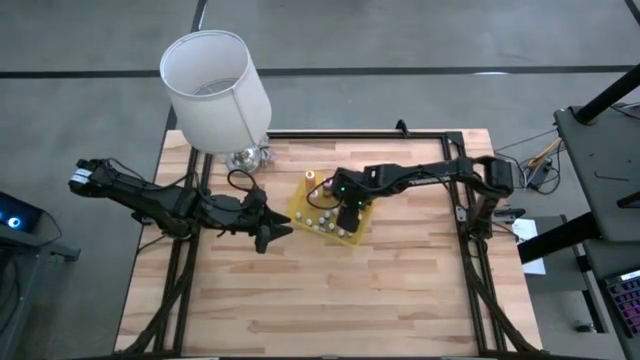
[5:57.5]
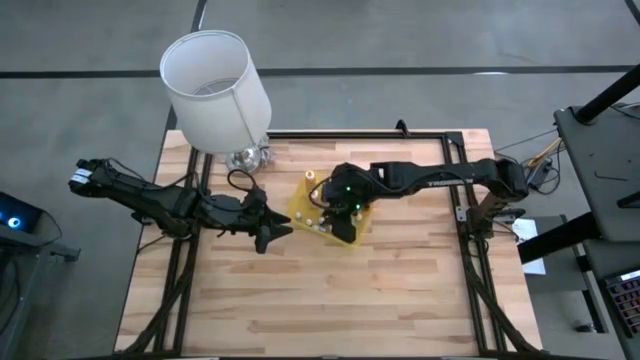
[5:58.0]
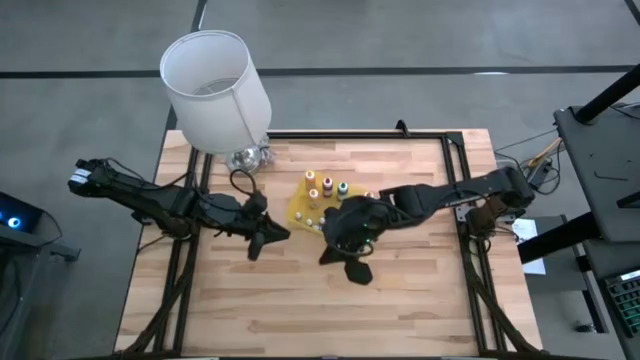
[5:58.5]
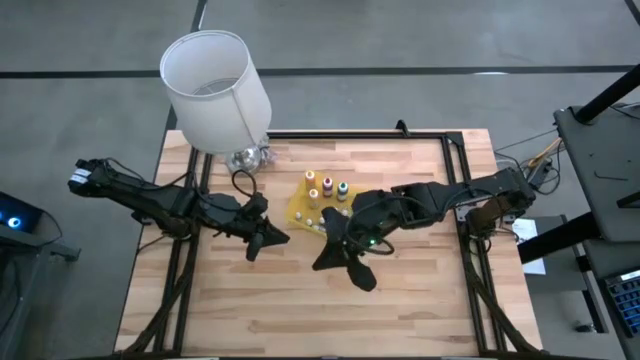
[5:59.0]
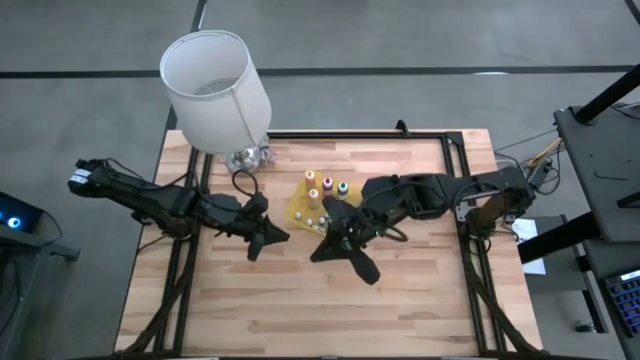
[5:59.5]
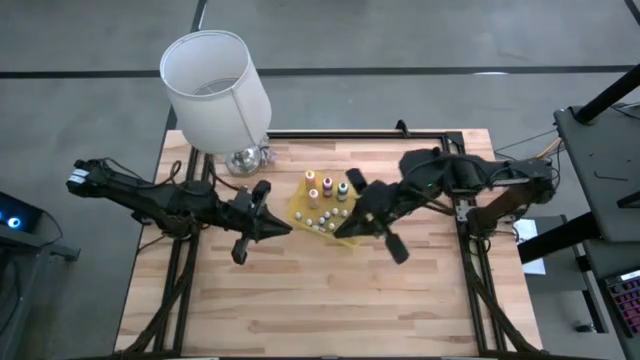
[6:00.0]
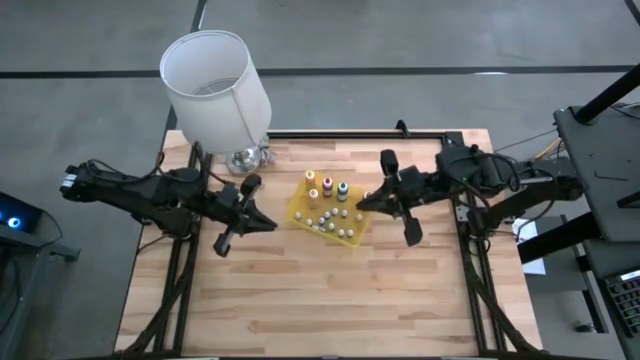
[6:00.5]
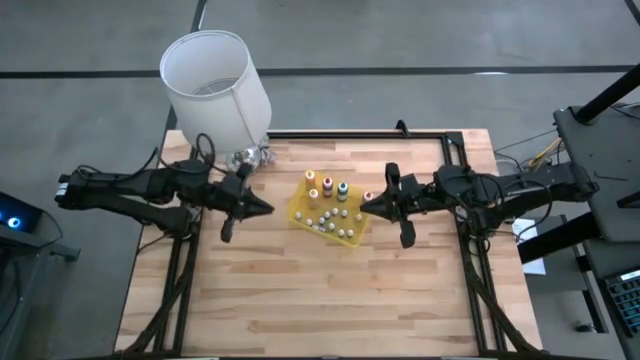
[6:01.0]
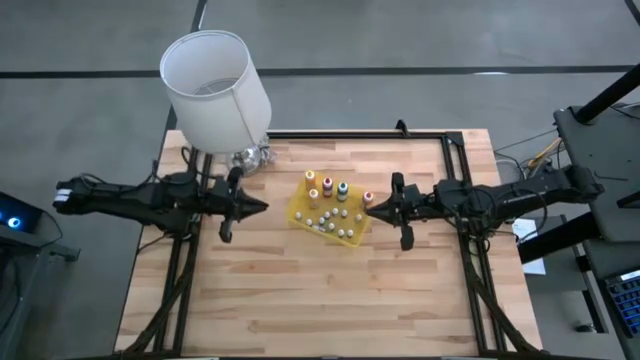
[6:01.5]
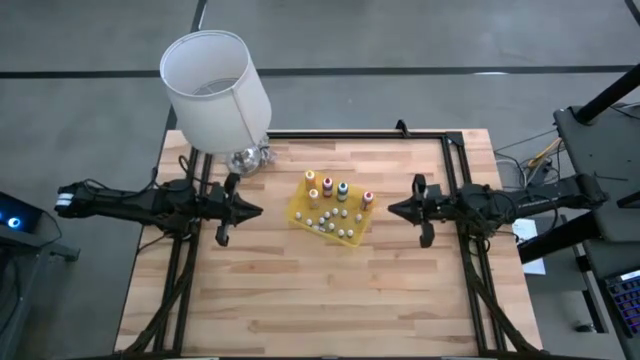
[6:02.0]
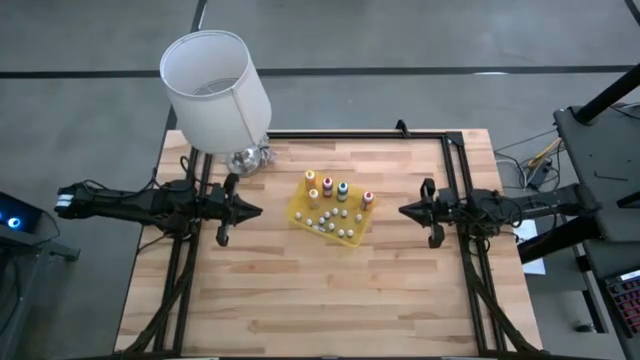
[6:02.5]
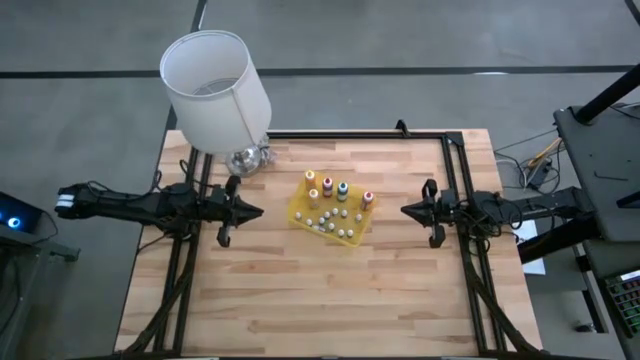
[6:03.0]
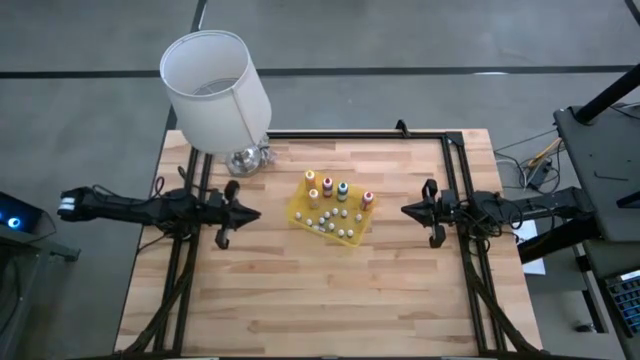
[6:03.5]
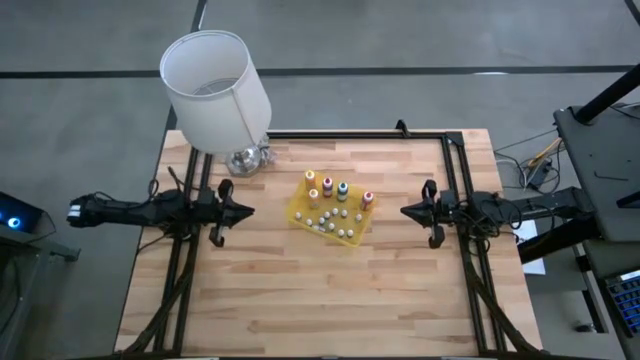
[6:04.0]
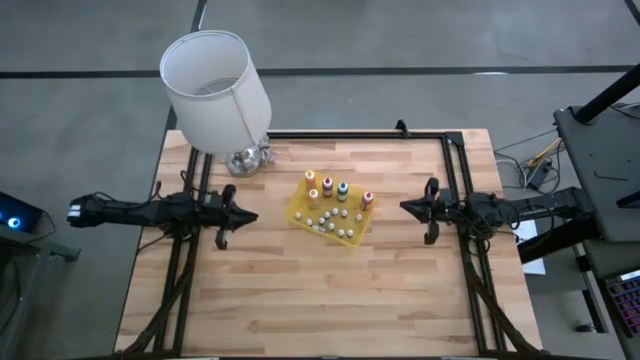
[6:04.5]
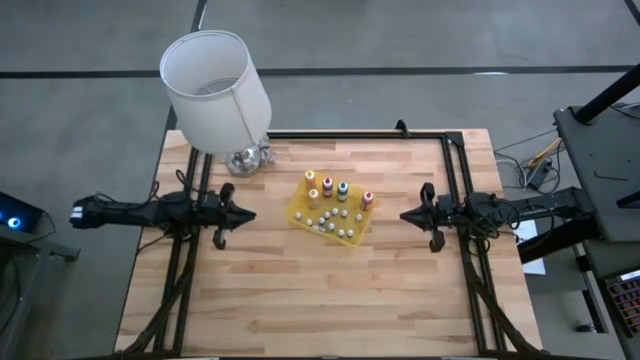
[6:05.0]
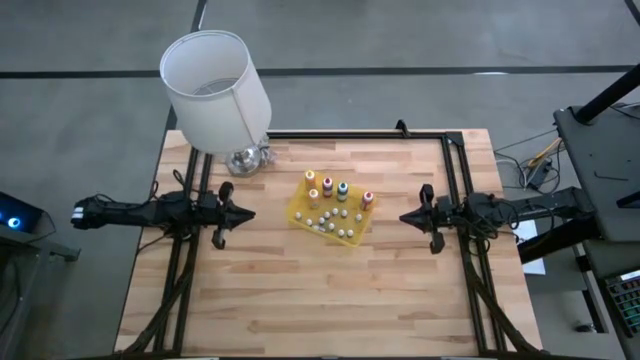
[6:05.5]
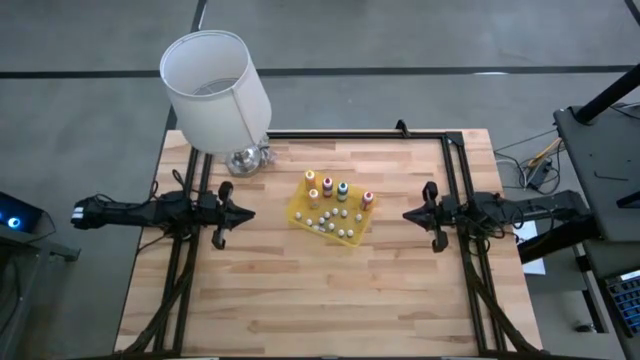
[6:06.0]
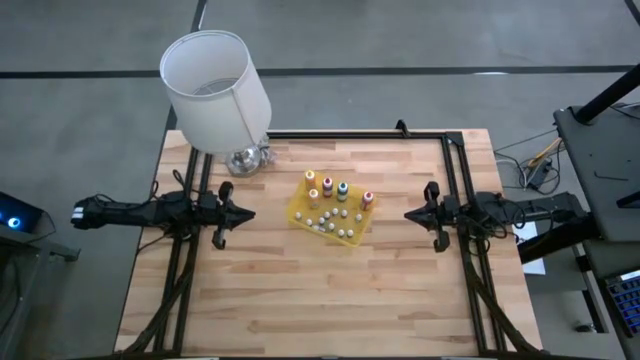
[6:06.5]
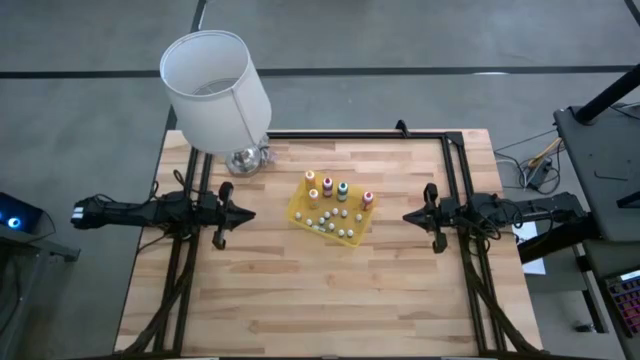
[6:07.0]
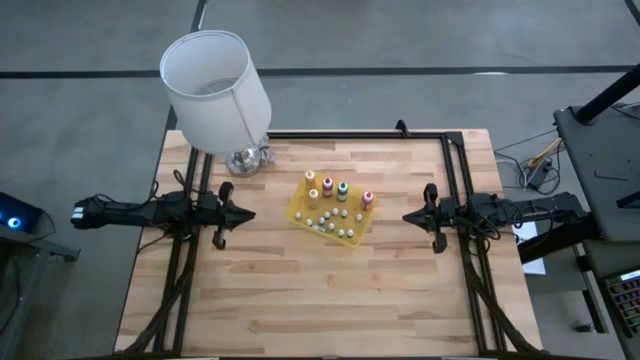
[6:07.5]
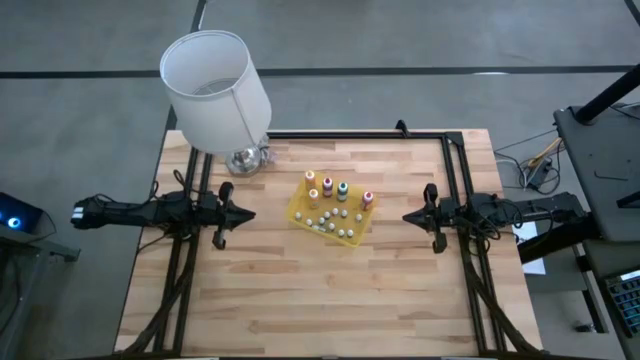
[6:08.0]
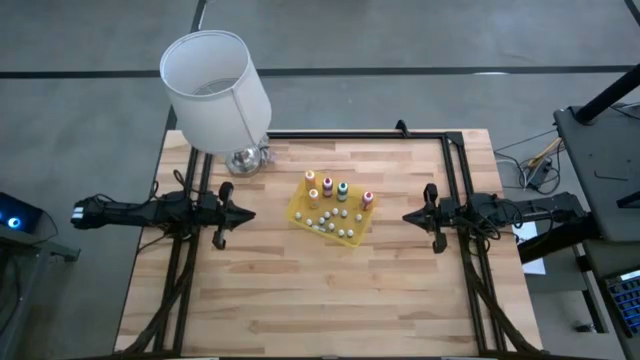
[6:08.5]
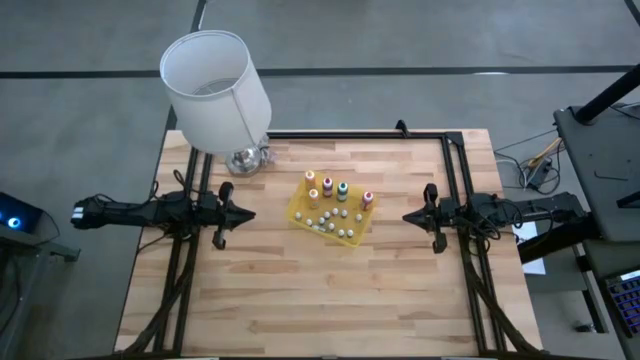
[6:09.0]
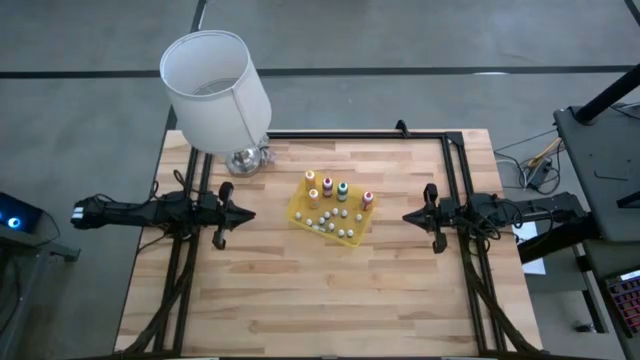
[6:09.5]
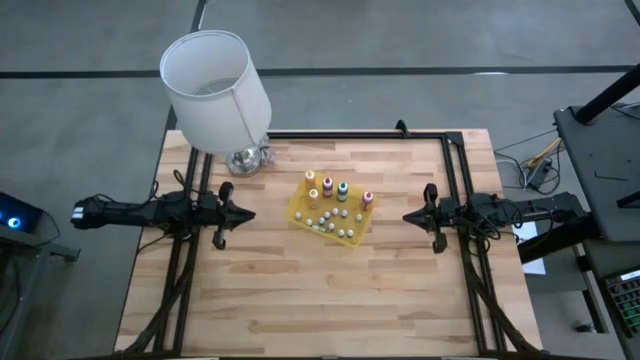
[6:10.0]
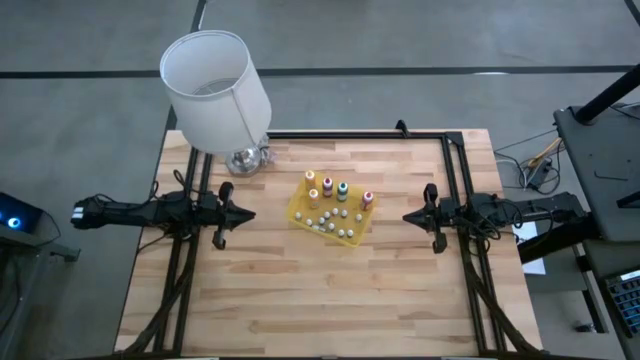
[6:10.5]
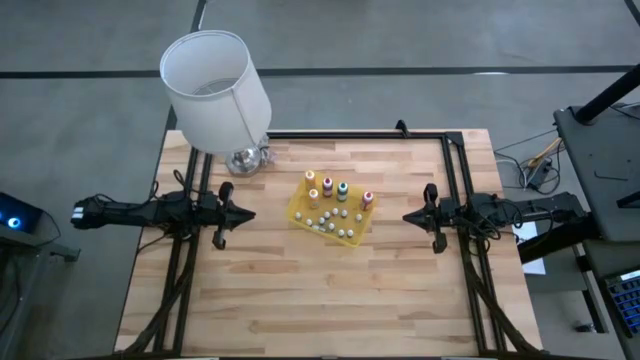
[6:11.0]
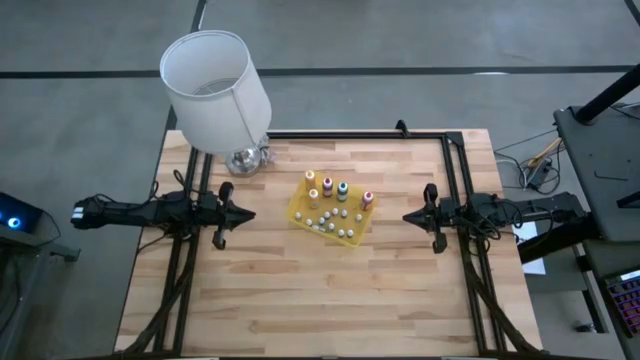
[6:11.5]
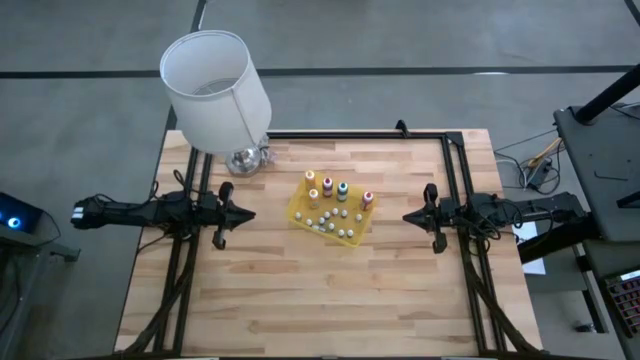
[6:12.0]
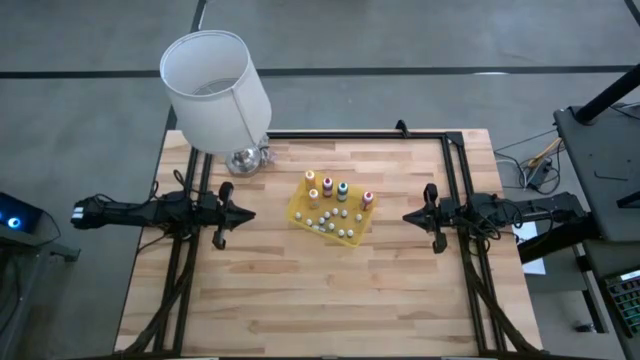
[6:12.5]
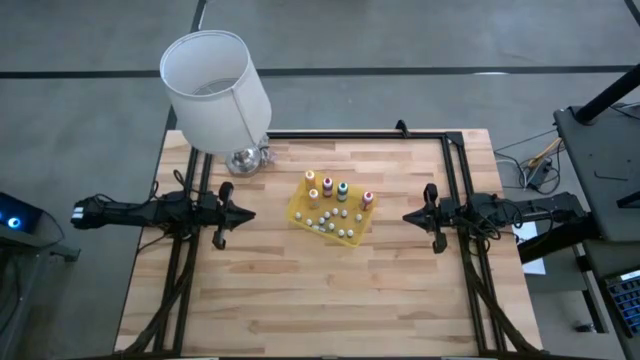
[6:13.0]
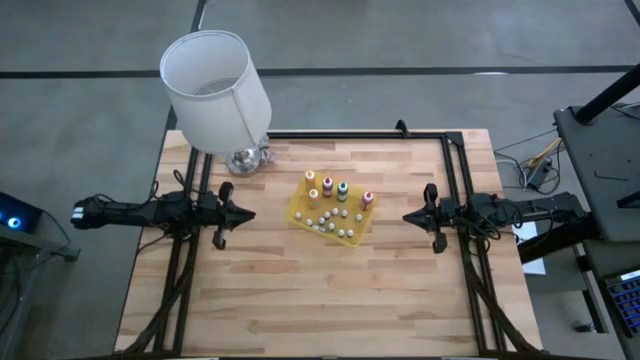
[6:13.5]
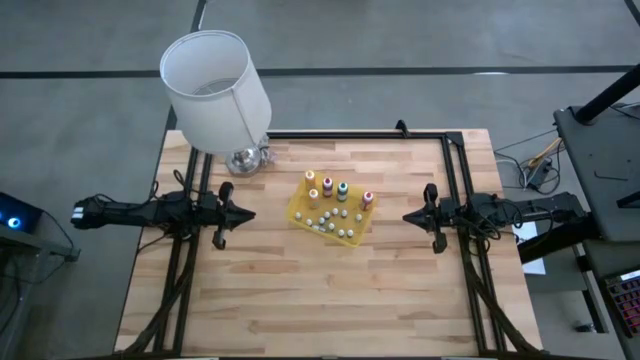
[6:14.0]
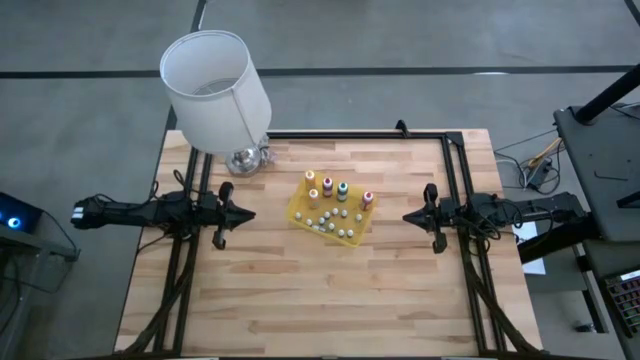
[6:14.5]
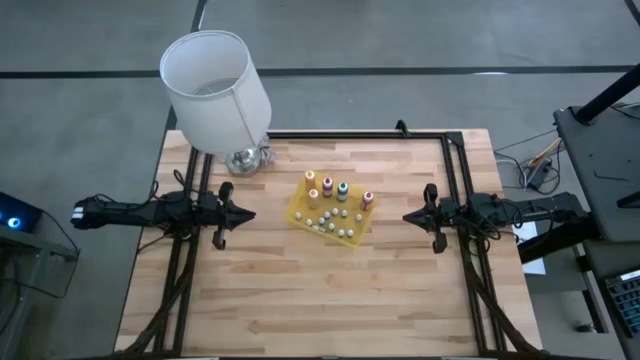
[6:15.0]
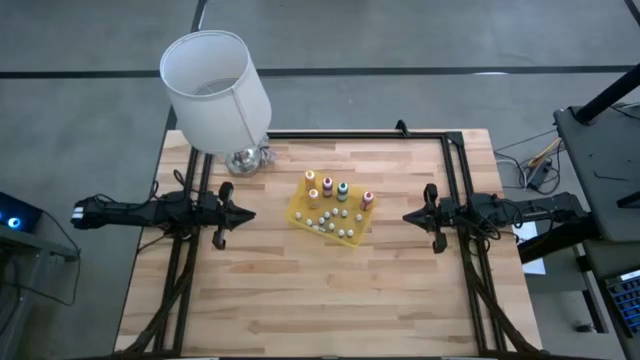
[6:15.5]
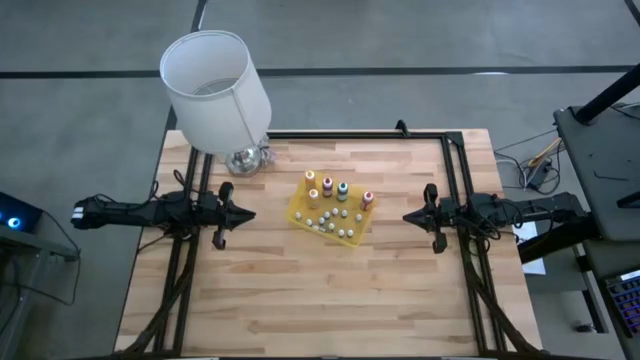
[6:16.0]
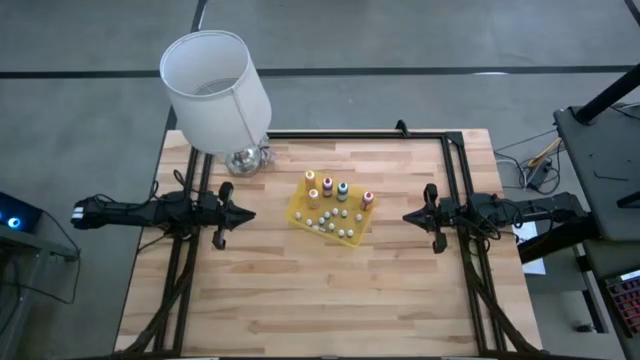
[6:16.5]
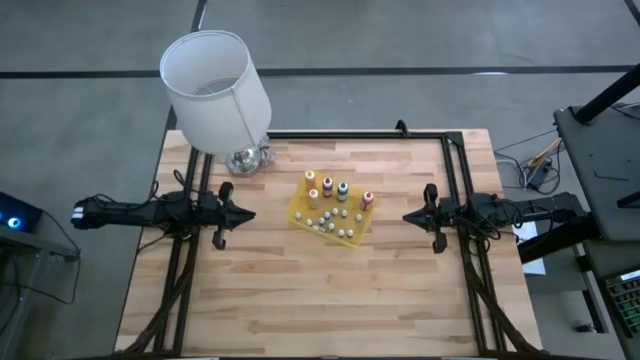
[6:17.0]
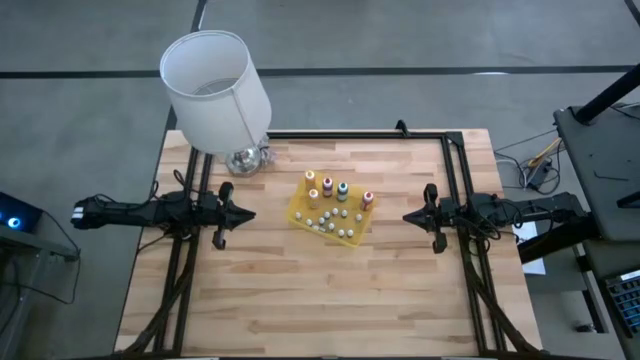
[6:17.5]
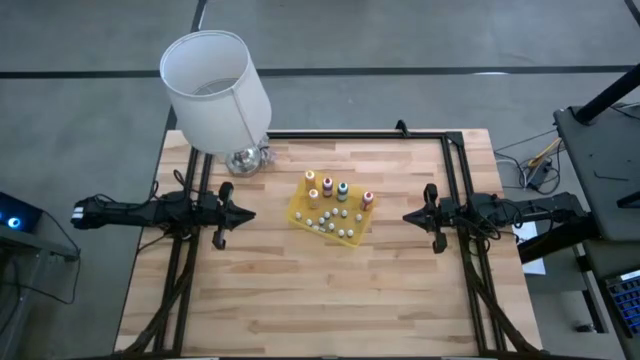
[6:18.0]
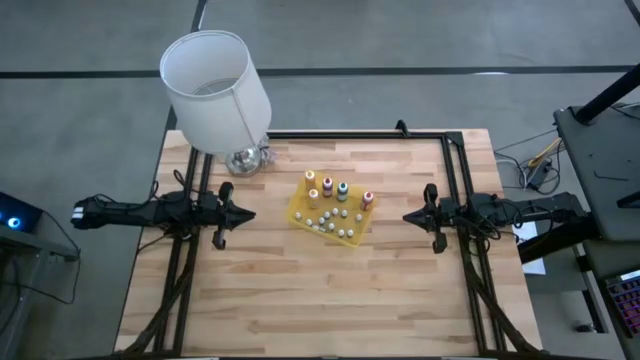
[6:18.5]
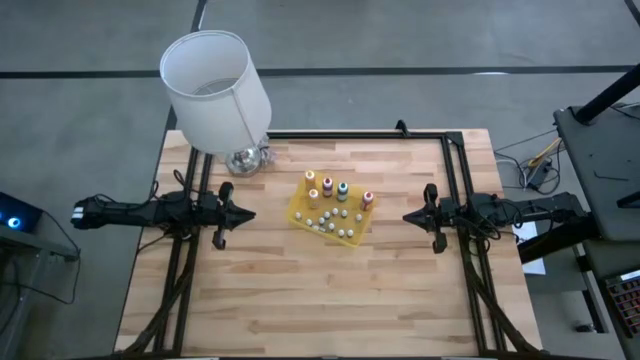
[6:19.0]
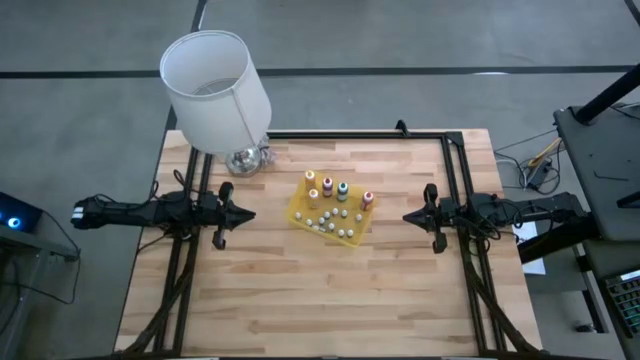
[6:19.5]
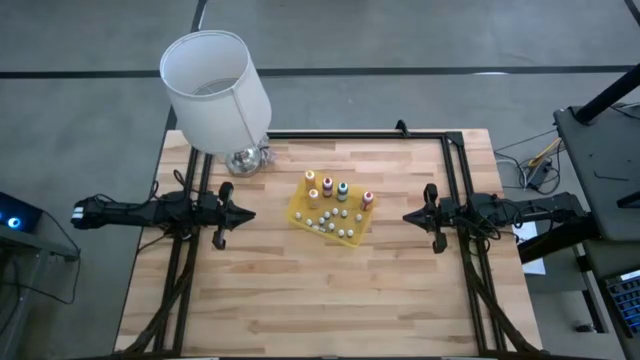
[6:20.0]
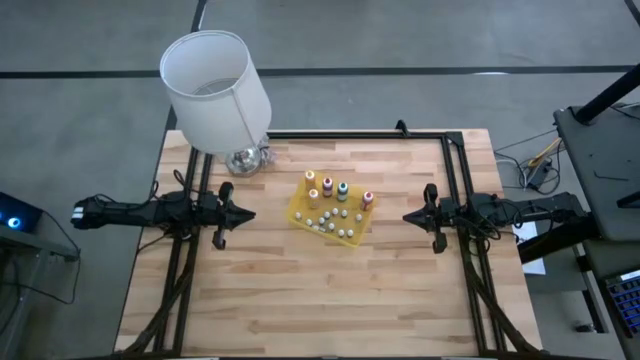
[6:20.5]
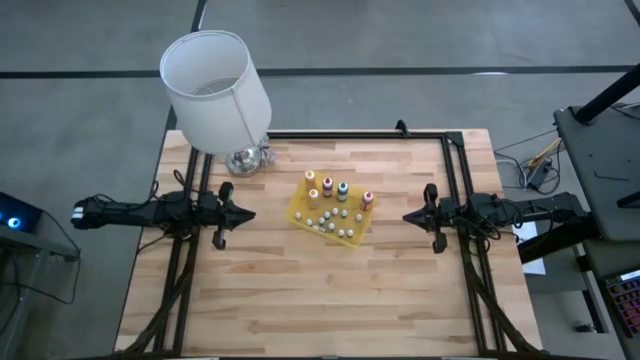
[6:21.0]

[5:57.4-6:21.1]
Task: Pick & Place food coloring
Return to Home Position
